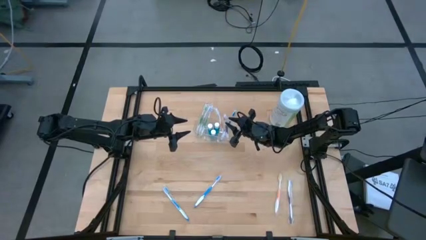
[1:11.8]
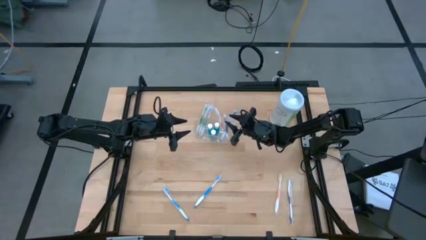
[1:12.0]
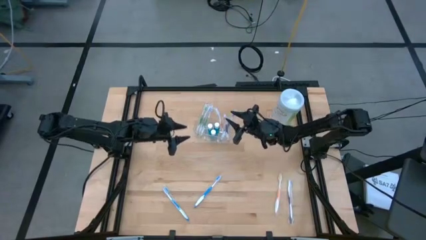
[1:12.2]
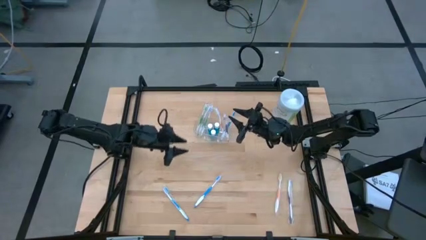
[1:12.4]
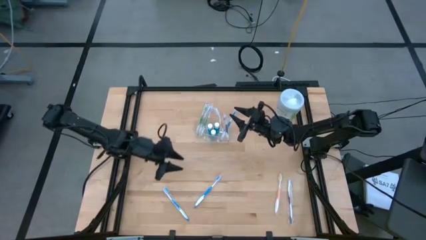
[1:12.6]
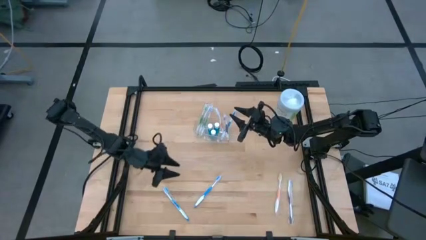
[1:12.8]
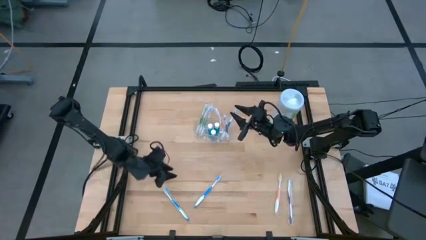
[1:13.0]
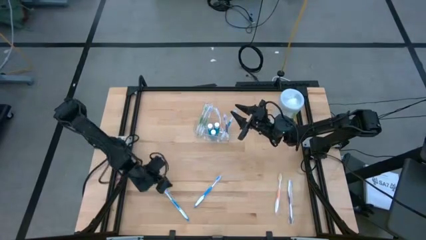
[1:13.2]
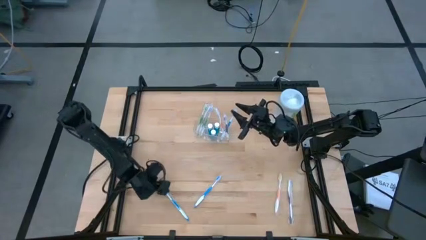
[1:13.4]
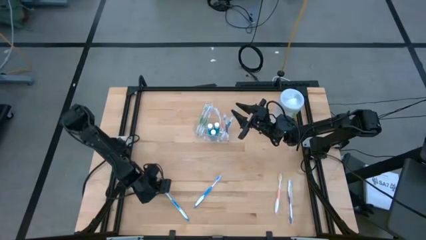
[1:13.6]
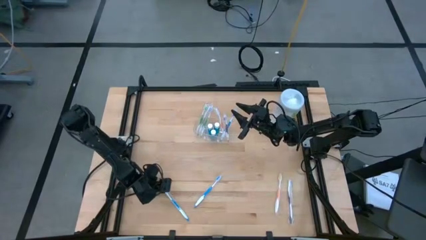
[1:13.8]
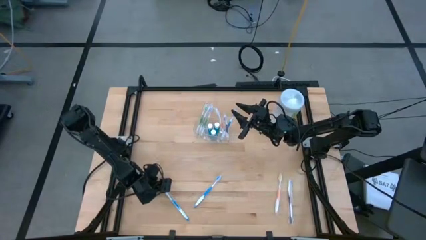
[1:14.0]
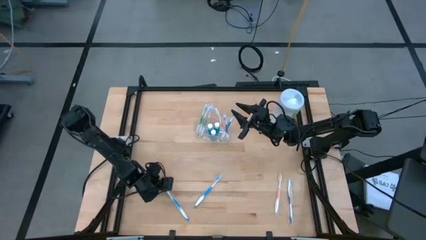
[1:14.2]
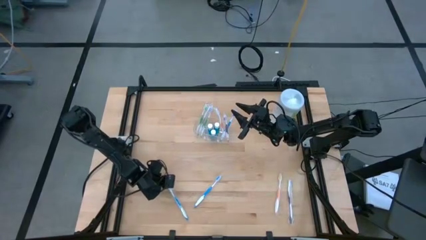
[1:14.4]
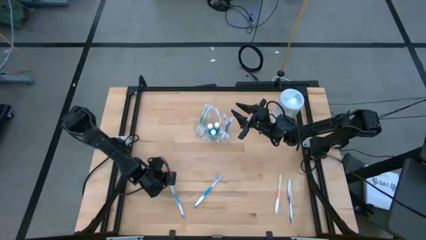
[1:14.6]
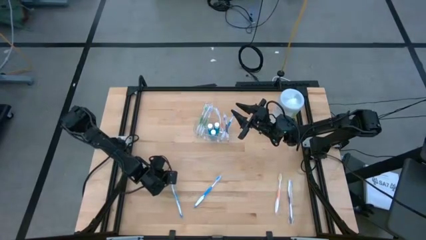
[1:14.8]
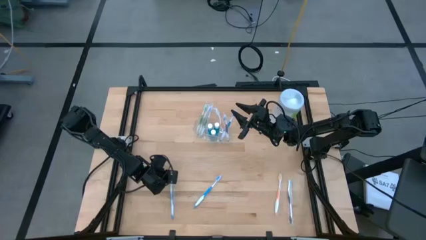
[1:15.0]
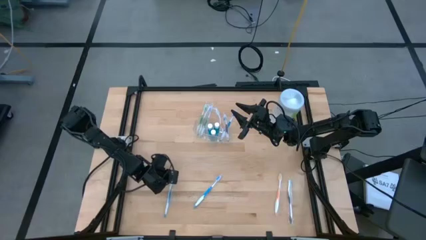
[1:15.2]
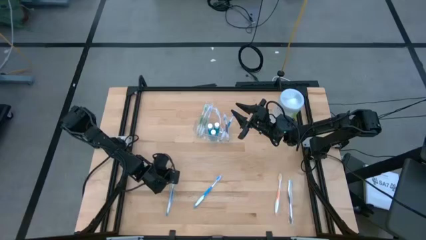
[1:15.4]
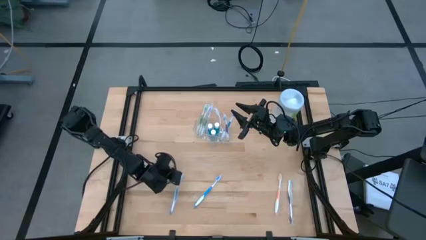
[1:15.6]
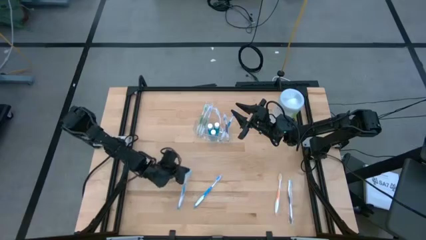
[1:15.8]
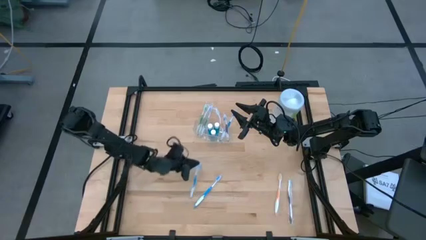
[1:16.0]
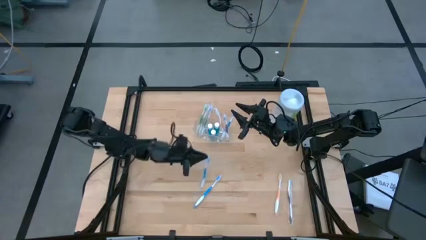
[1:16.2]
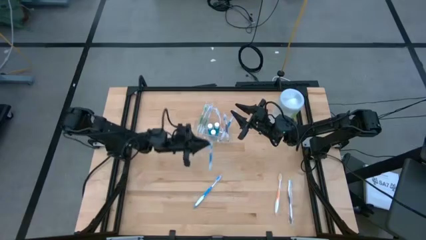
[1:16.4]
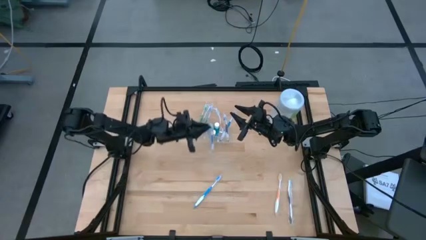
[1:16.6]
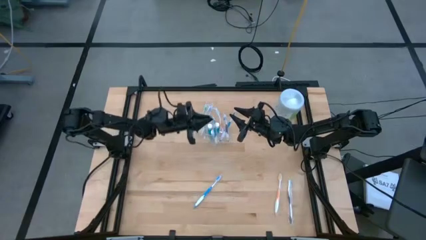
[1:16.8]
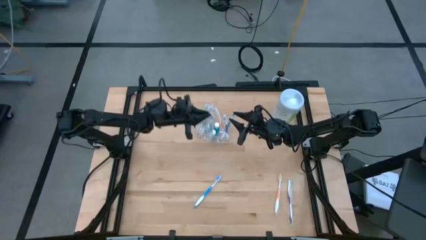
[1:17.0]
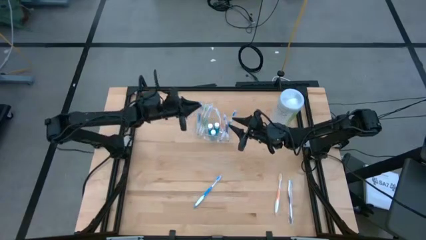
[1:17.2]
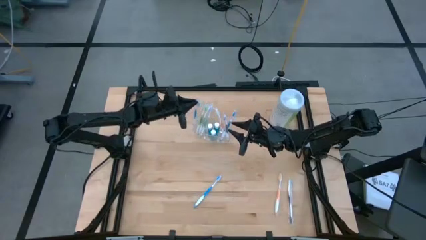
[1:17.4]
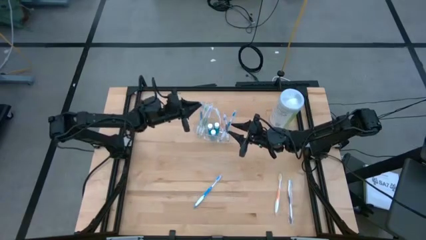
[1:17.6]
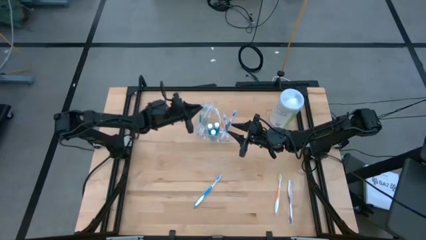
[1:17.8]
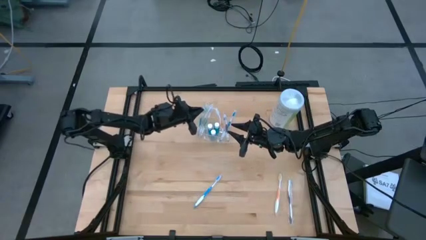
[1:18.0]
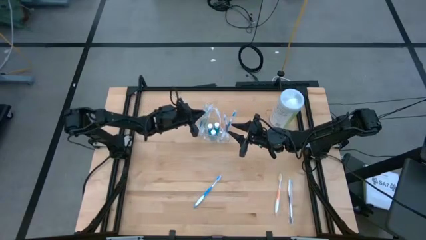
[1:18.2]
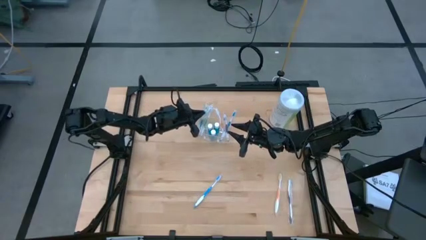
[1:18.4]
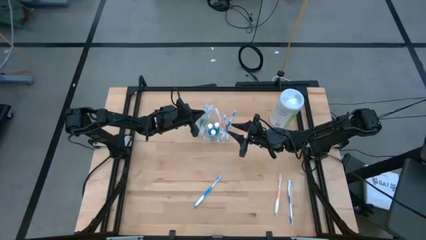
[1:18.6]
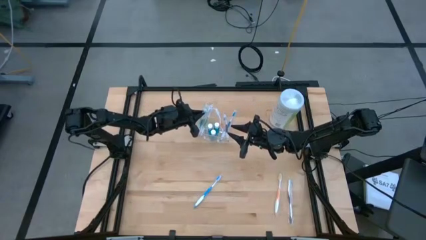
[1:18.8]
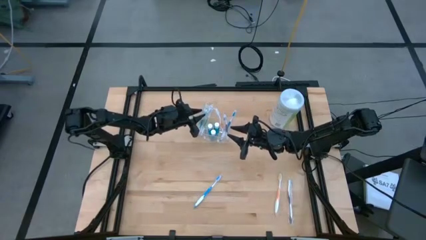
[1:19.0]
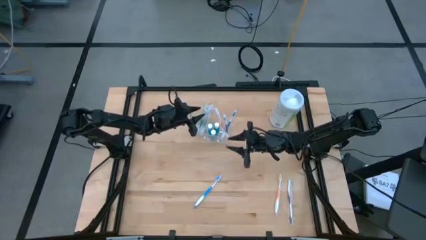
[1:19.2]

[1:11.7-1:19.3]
Task: Pick & Place toothbrushing station
Put the blue toothbrush into the left section of the transparent organizer

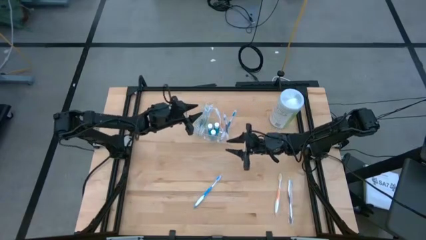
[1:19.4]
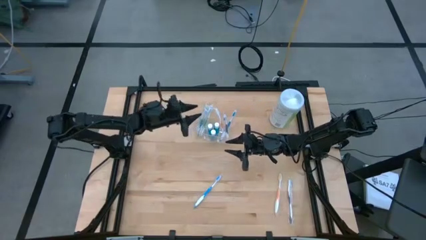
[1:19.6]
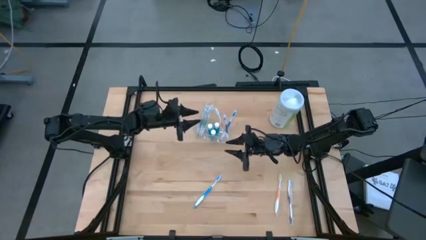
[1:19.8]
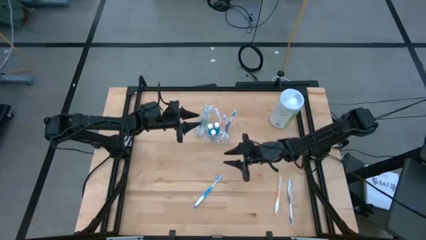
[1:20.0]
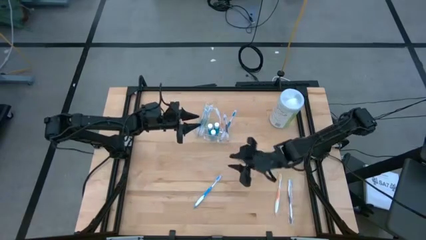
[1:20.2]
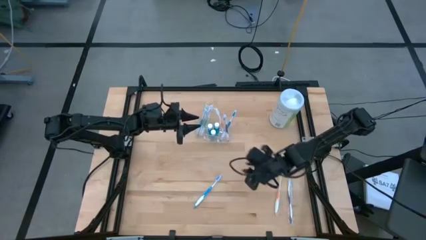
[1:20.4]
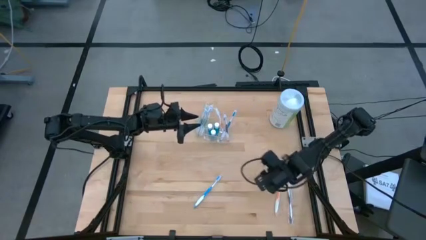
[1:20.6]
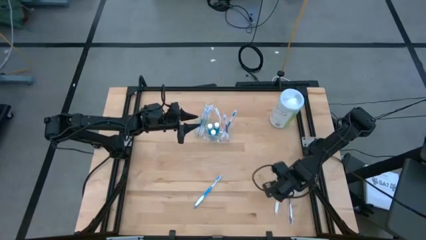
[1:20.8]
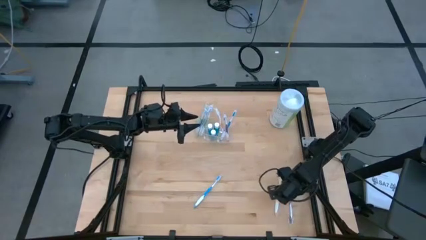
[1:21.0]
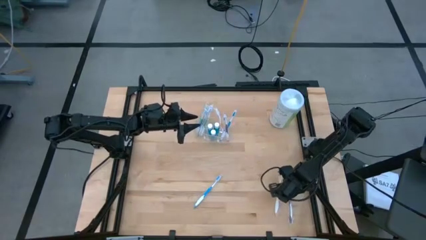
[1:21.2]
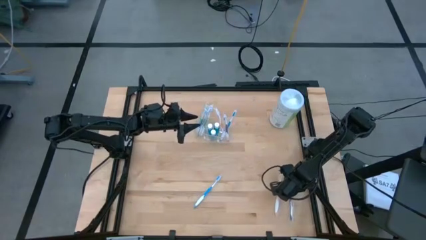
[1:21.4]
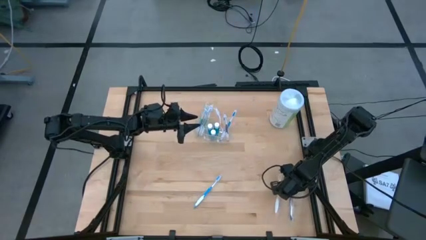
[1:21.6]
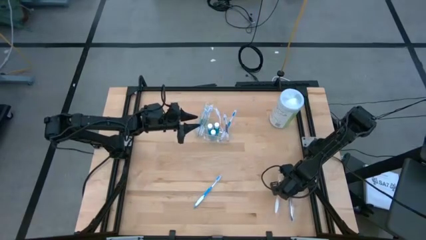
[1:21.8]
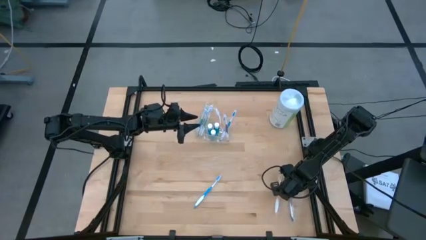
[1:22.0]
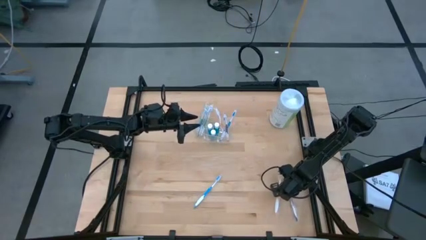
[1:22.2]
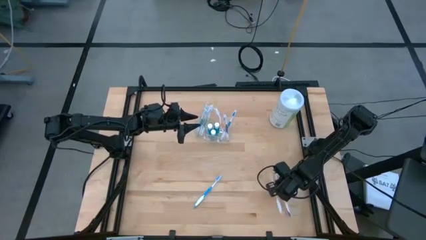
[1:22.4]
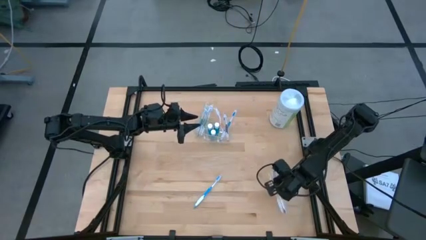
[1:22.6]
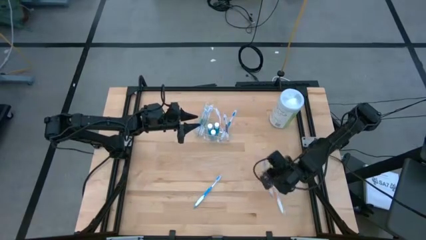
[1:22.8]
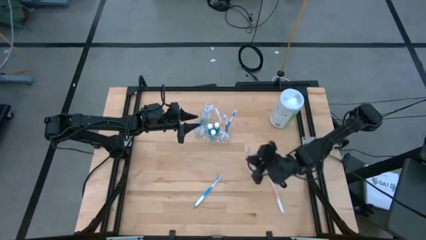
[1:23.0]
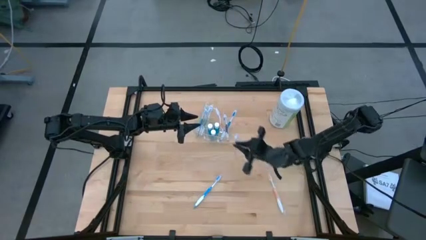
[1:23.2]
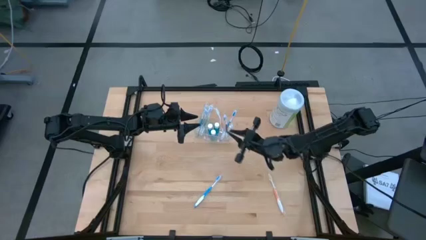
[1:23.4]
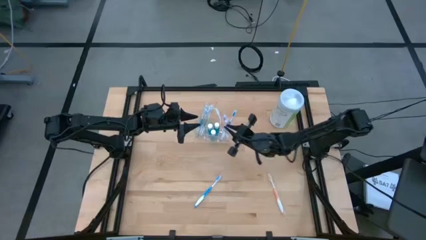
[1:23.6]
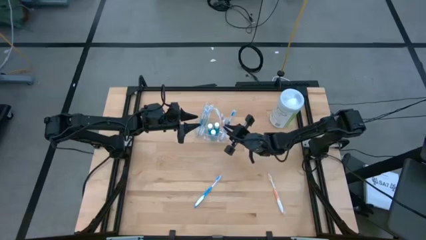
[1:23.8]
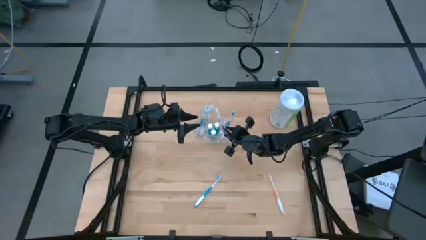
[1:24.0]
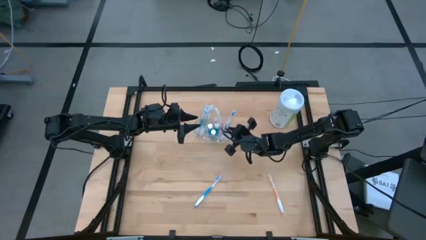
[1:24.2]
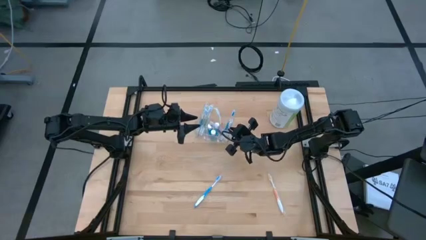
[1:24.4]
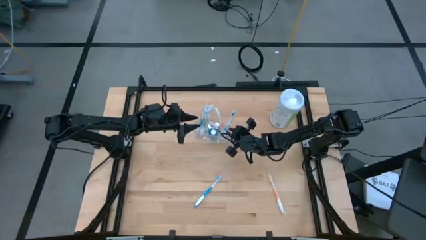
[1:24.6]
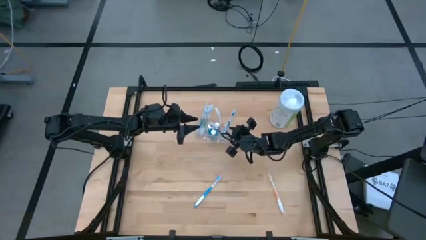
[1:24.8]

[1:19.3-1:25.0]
Put the purple toothbrush into the right section of the transparent organizer

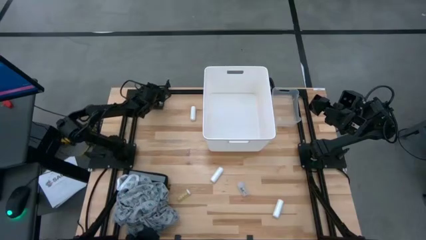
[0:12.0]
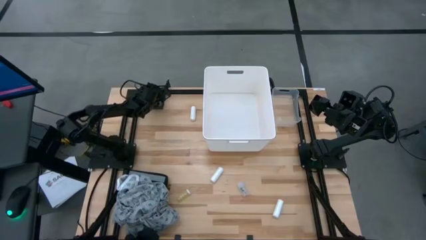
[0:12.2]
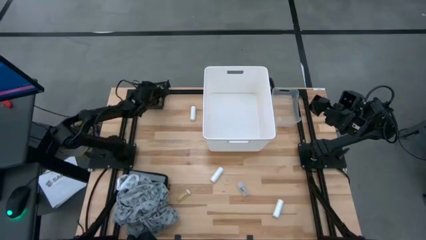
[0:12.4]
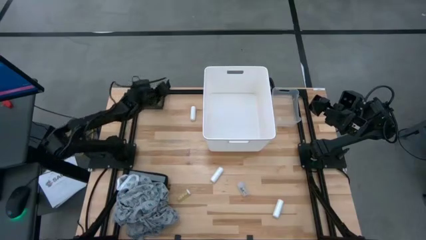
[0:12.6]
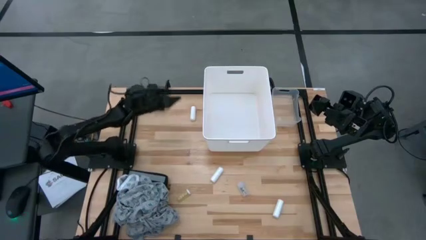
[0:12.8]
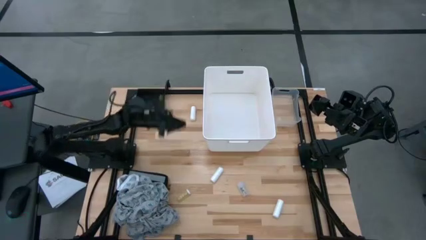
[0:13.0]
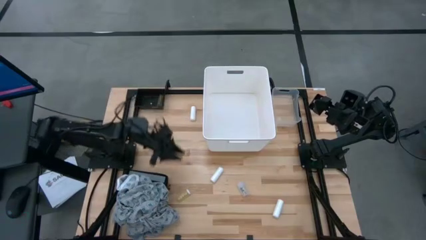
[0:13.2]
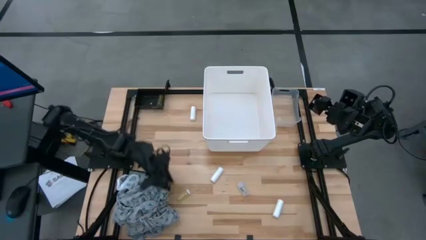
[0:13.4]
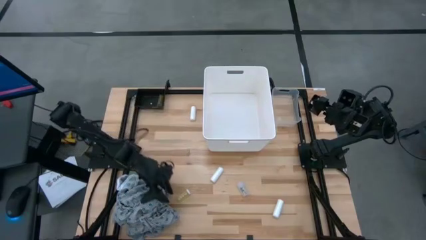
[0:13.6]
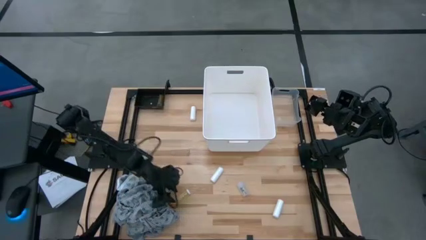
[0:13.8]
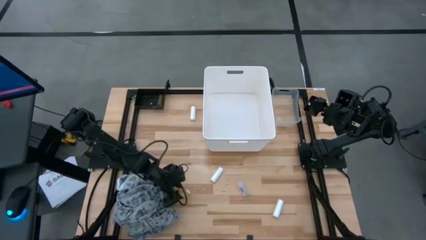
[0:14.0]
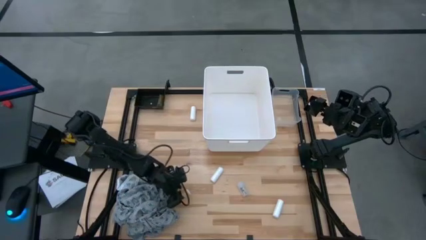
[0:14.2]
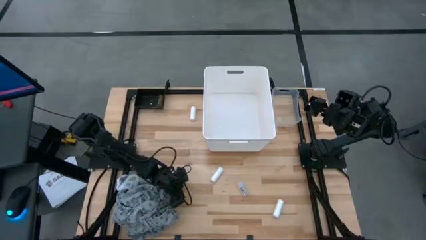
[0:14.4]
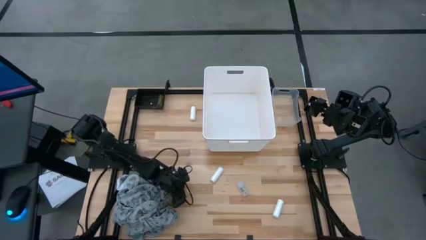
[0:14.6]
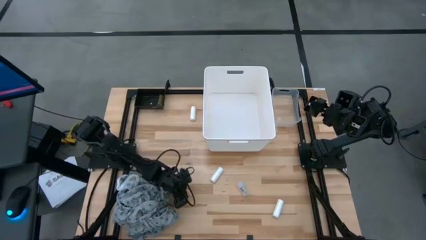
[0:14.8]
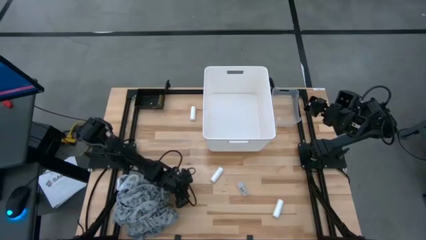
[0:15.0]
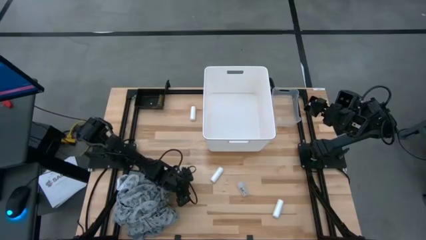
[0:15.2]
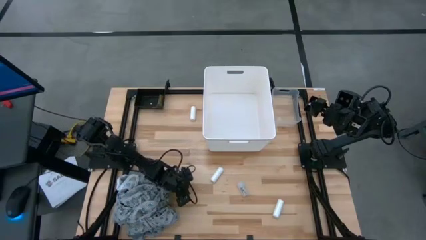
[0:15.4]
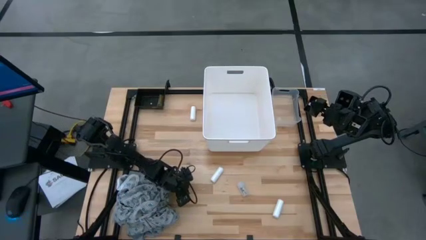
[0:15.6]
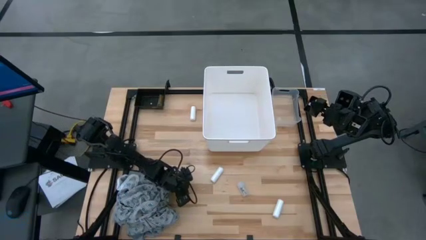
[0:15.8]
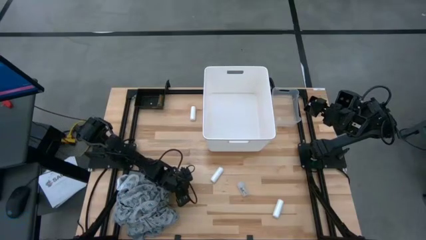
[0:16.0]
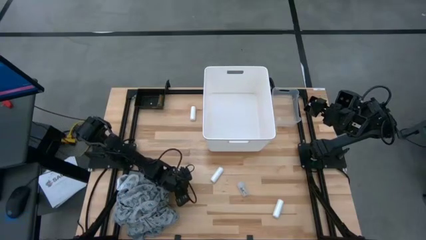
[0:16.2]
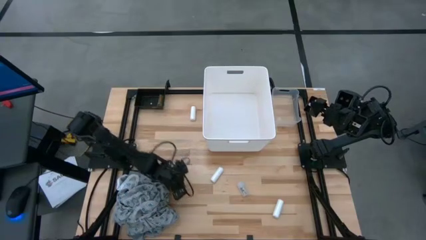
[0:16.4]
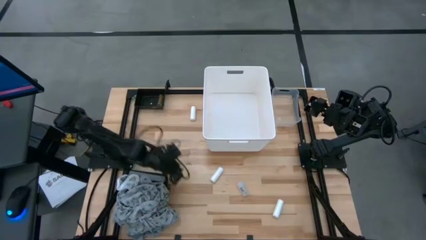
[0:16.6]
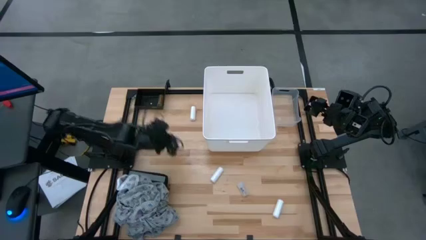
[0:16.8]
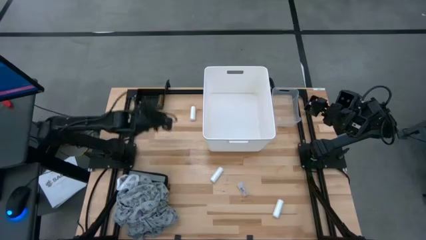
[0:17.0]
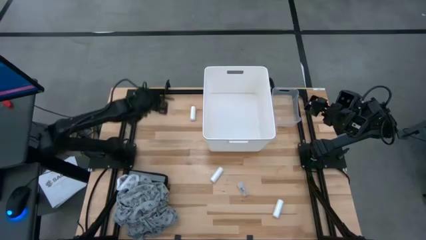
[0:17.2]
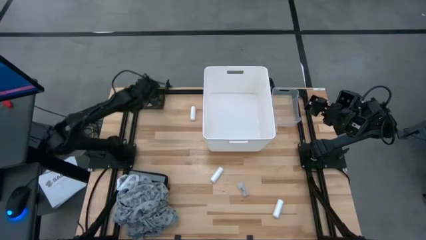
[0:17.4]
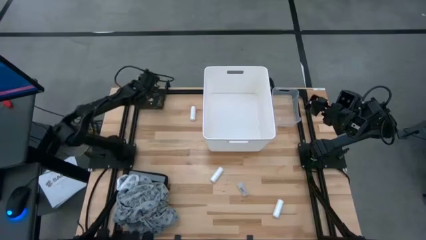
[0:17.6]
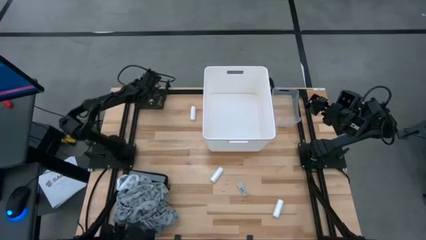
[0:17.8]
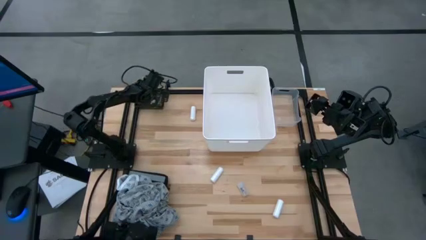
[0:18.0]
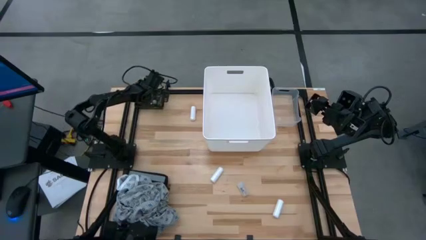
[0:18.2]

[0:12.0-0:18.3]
Task: Pick & place medical supplies in basket/bin
Put the yellow bottle in the black bin
